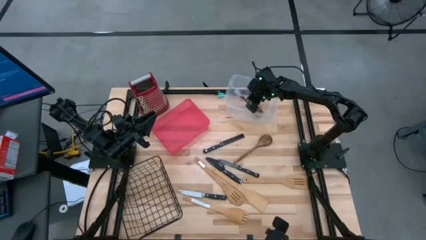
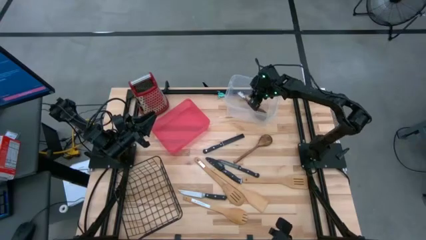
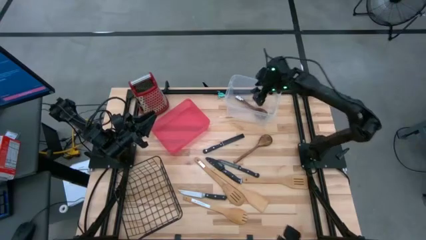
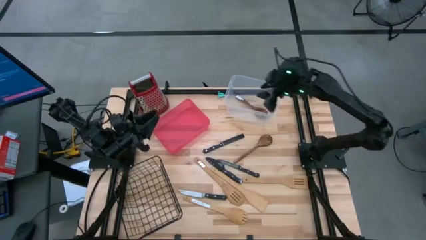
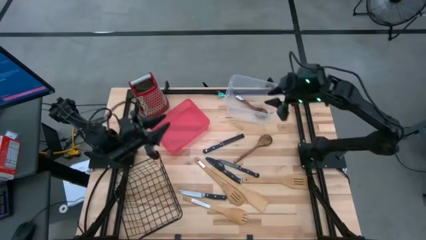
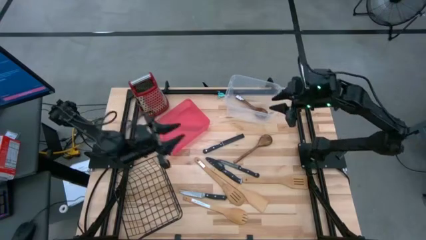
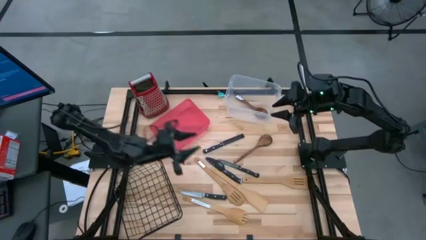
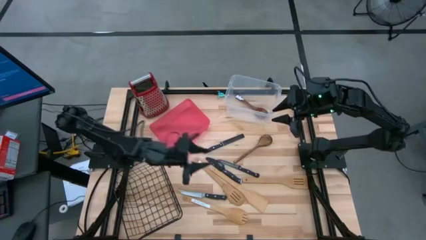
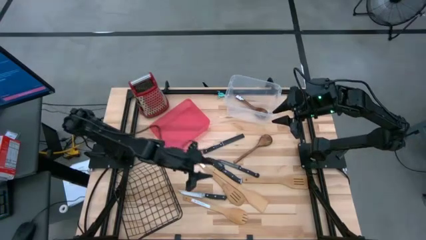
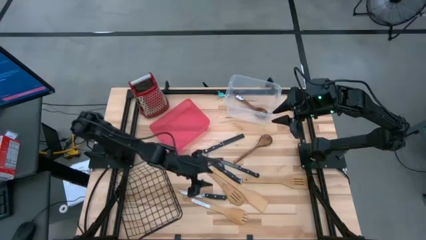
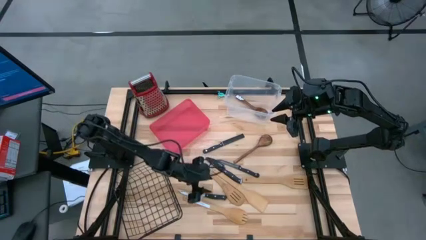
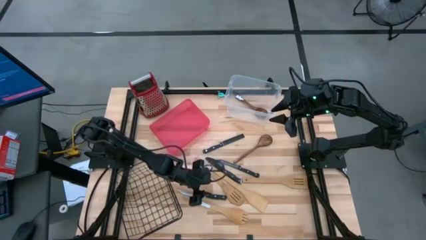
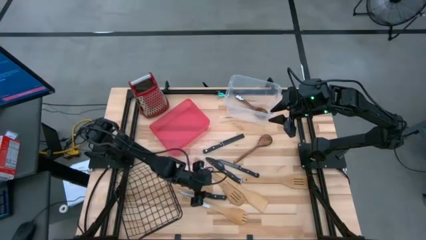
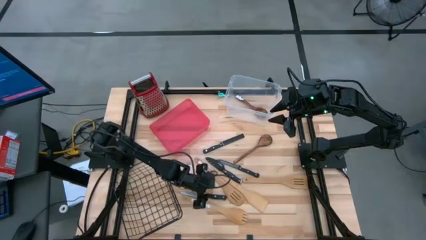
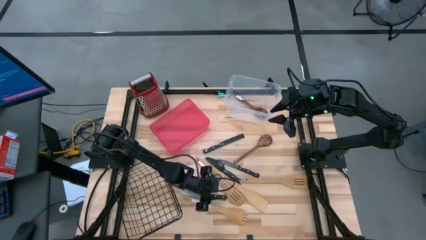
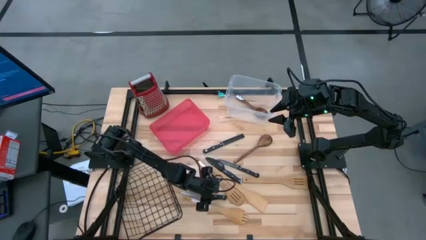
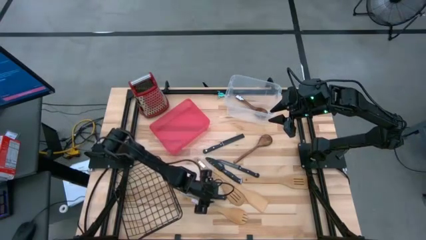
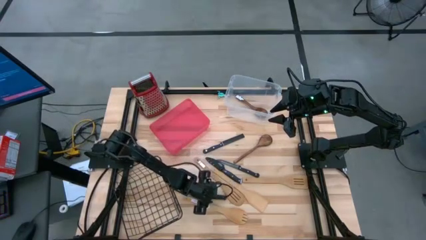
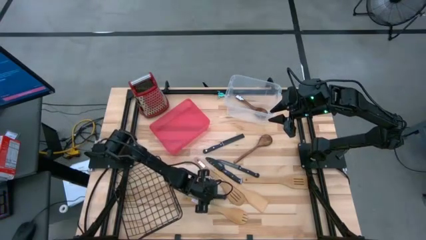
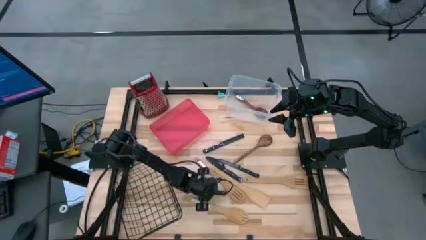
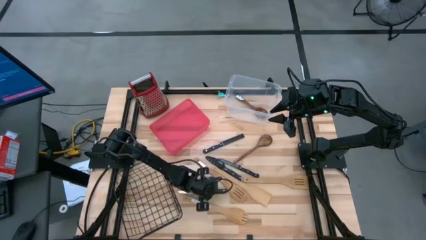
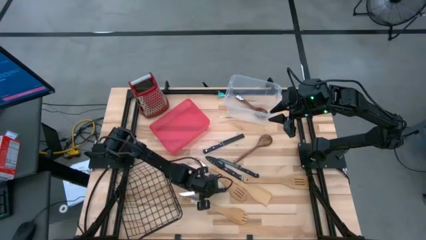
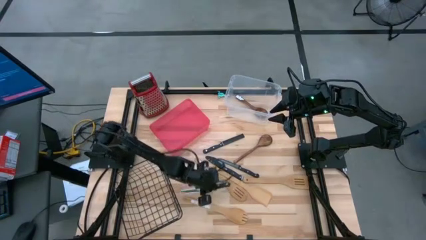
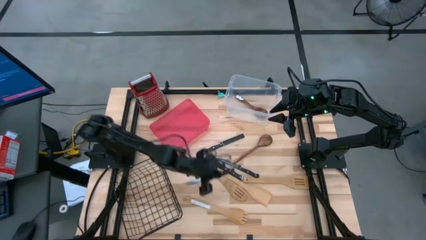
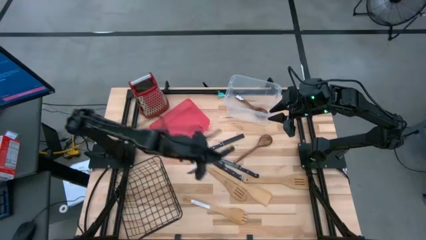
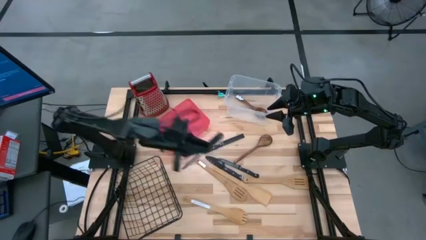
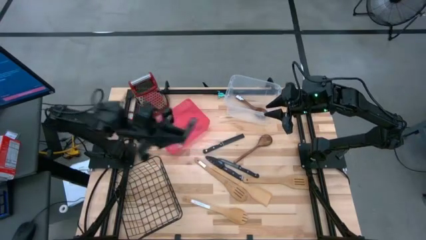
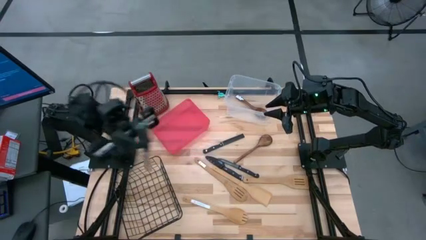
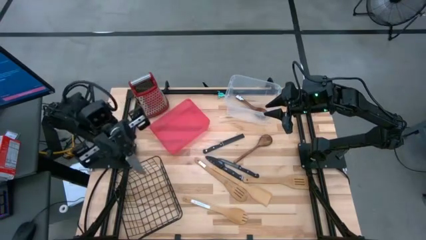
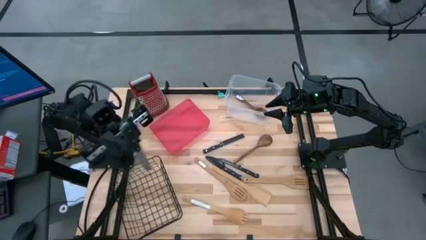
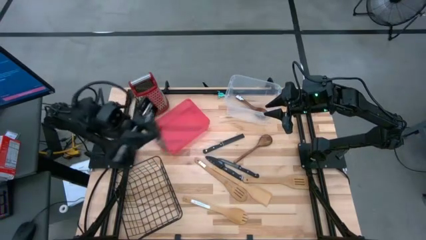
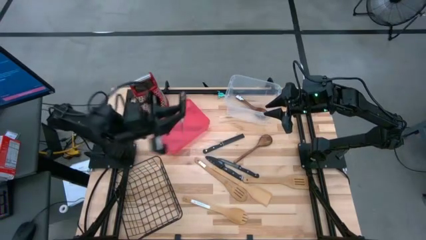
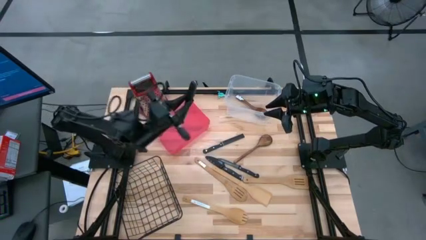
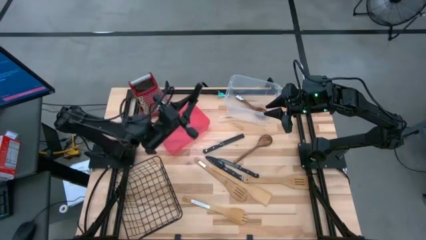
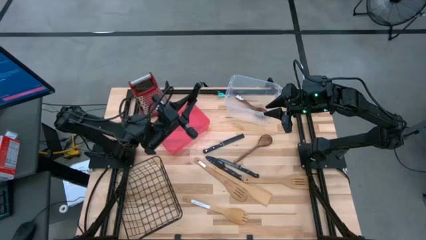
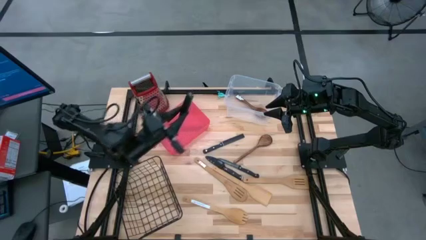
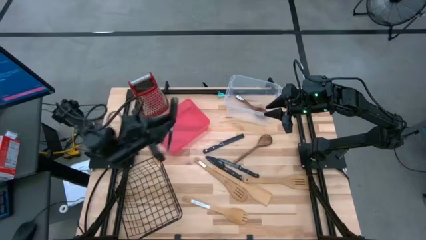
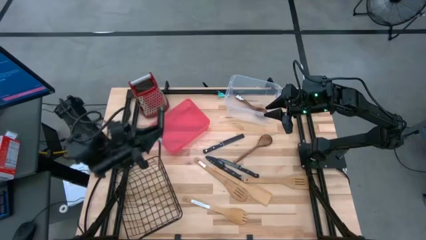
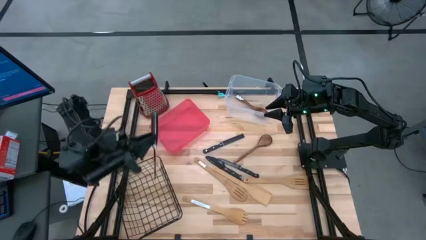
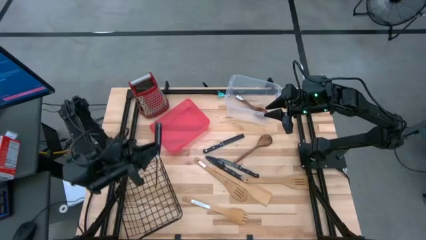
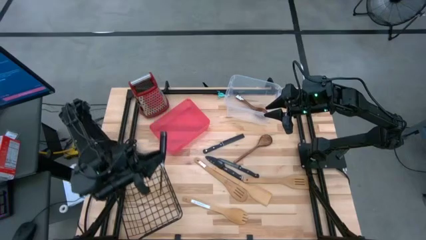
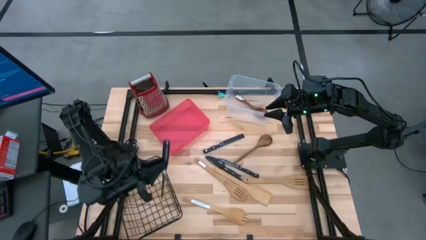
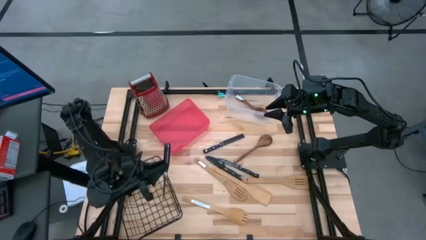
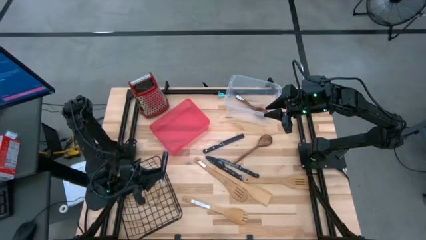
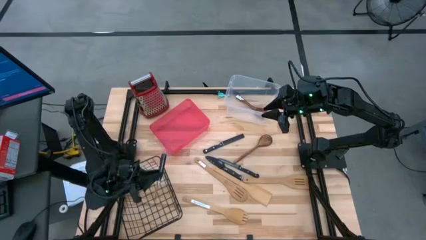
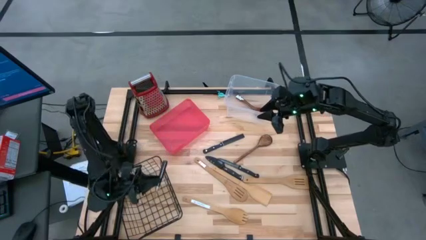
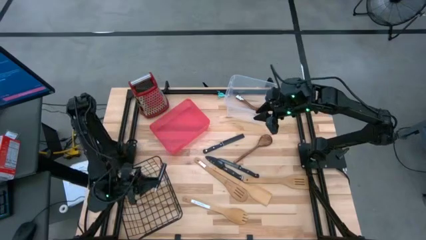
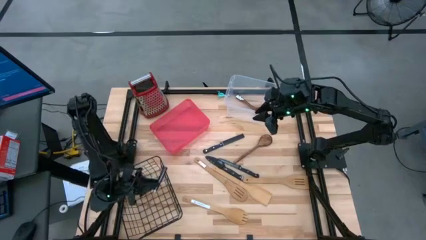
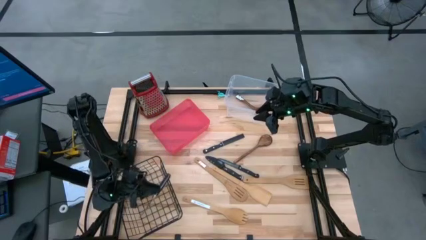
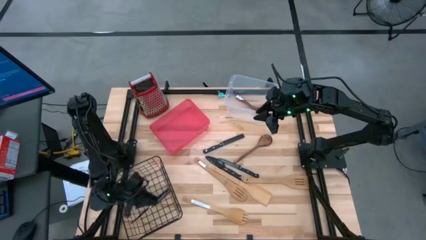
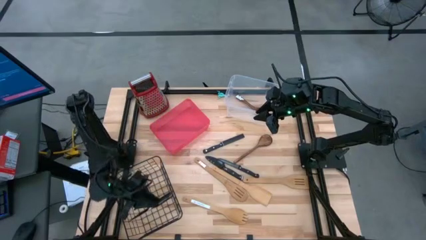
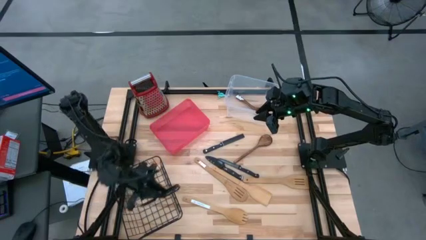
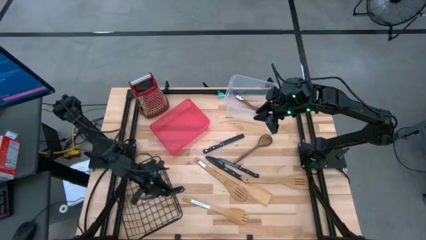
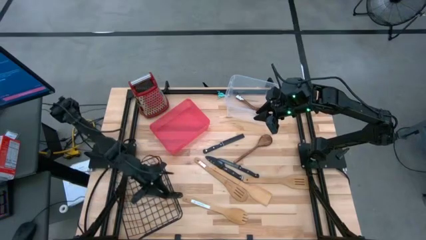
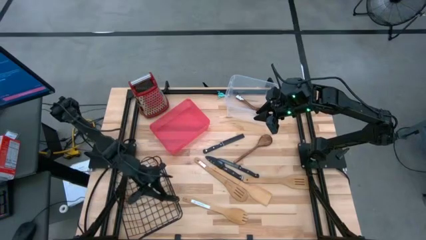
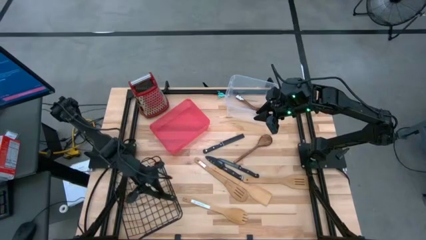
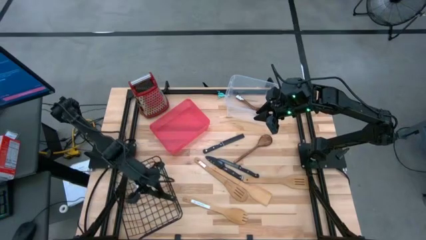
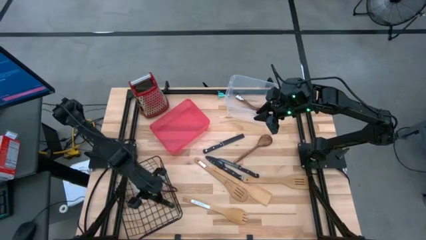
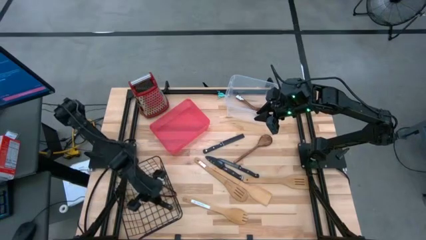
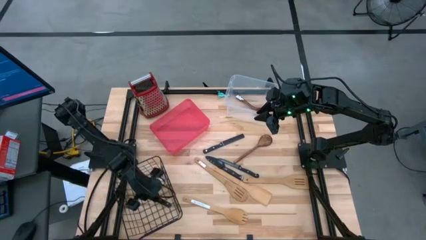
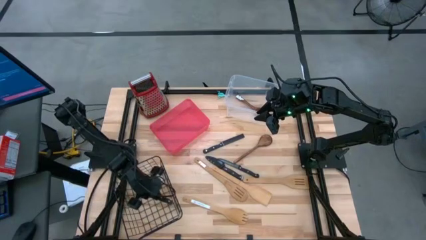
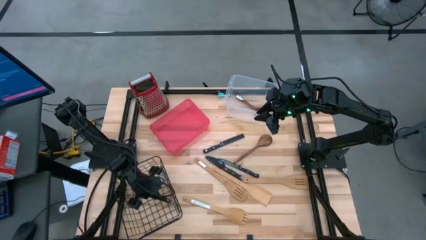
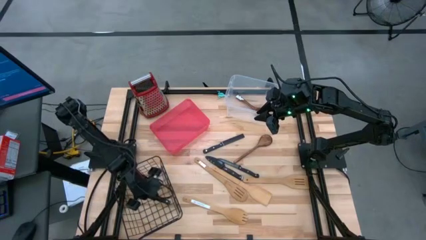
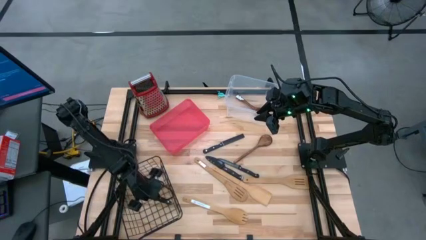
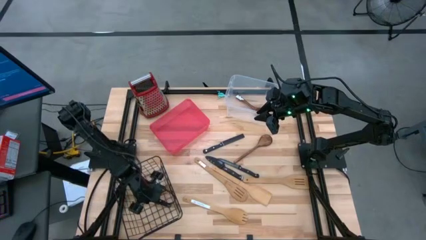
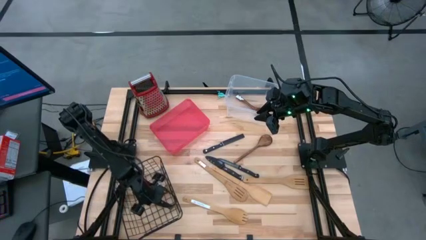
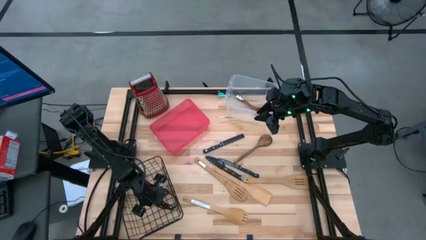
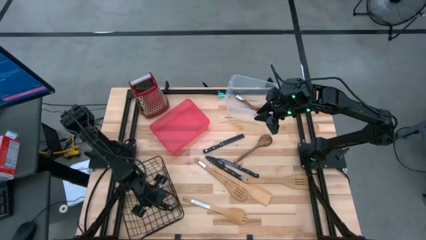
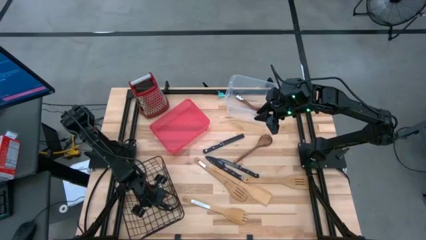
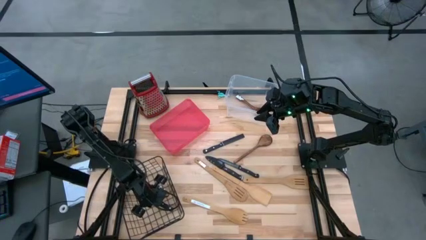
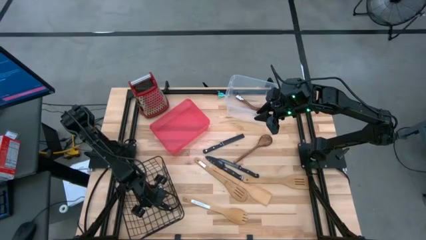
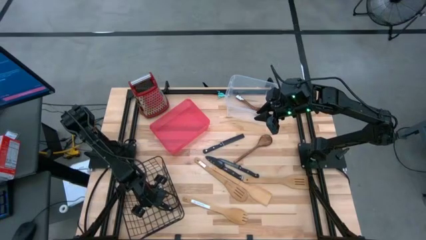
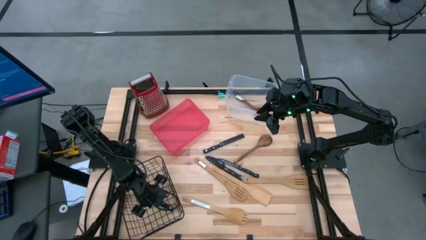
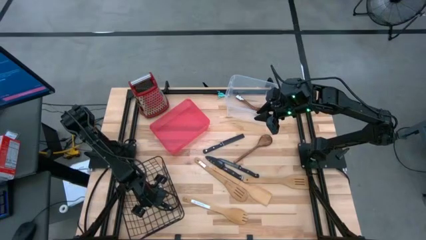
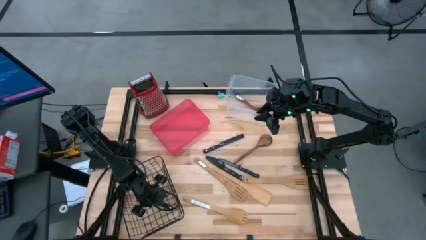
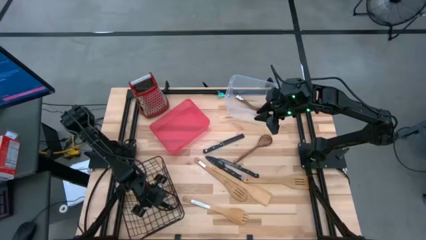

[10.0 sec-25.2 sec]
Task: Pick & Place Kitchen Items
Put the black kitchen knife into the wire basket
